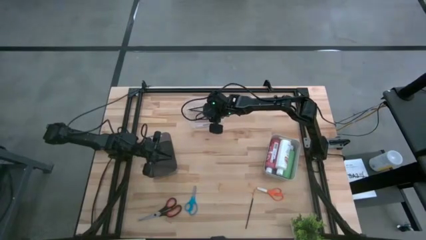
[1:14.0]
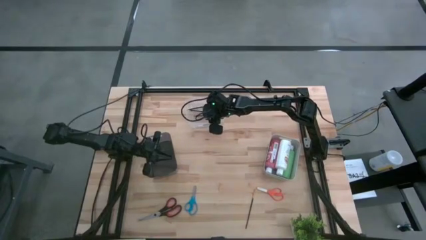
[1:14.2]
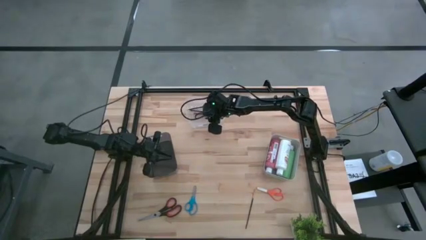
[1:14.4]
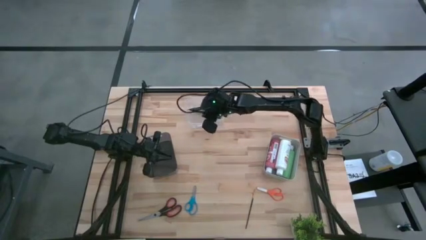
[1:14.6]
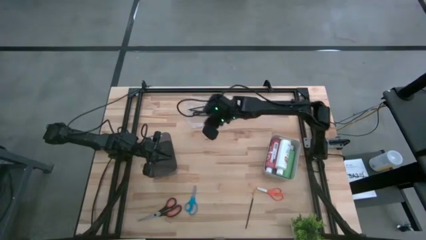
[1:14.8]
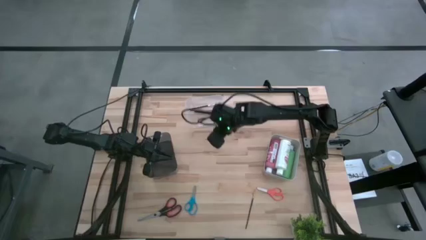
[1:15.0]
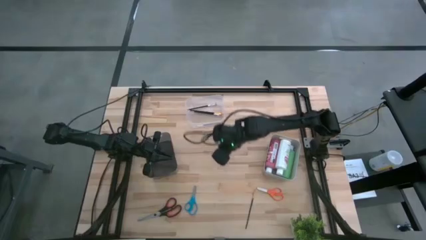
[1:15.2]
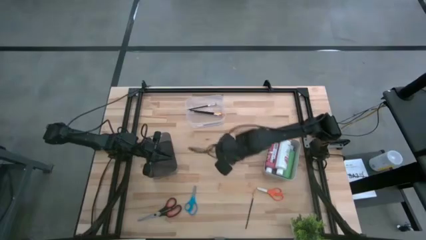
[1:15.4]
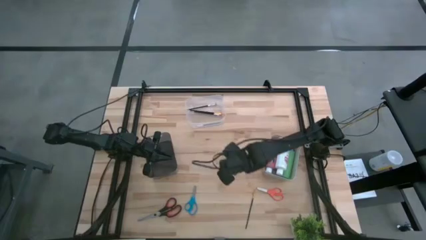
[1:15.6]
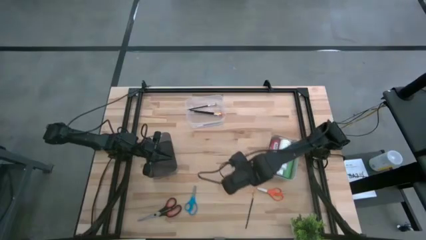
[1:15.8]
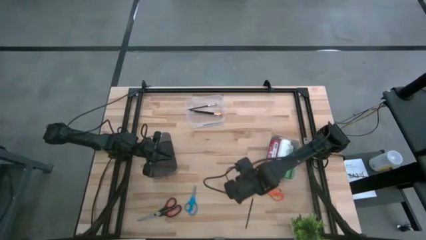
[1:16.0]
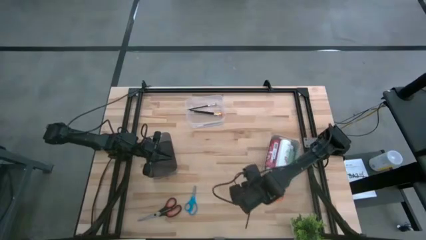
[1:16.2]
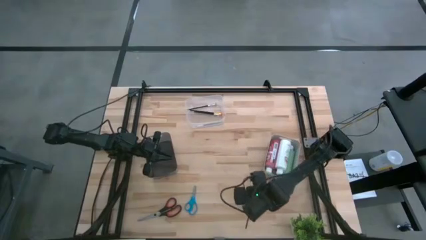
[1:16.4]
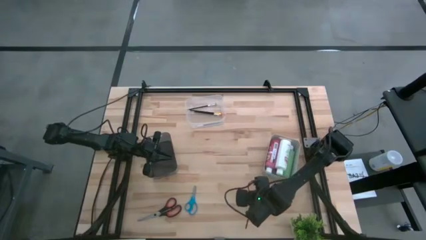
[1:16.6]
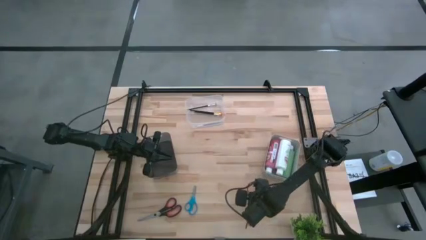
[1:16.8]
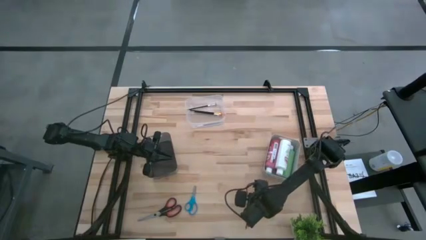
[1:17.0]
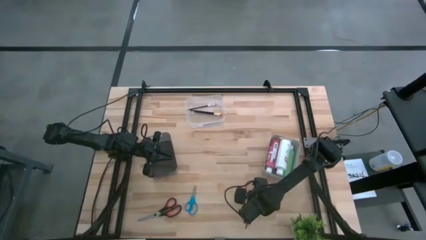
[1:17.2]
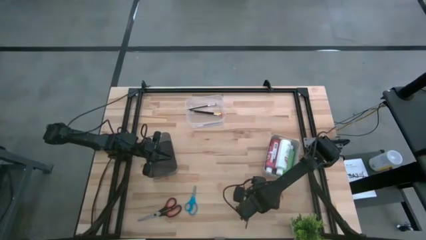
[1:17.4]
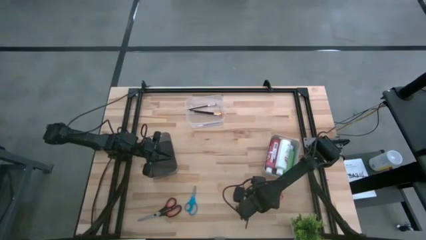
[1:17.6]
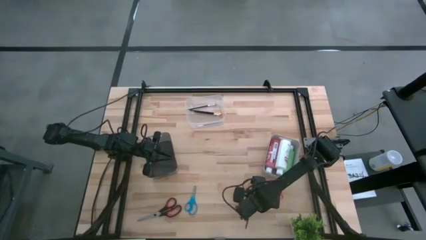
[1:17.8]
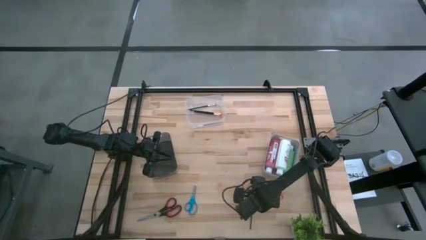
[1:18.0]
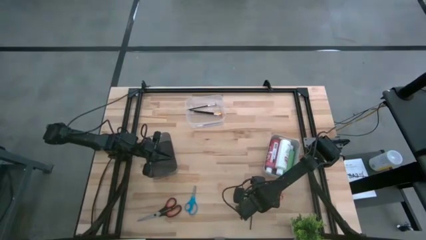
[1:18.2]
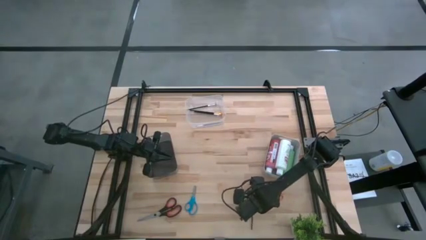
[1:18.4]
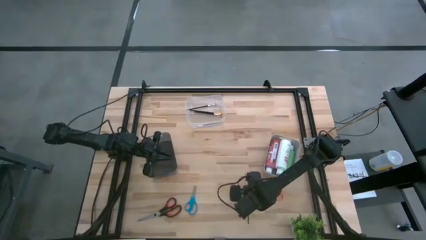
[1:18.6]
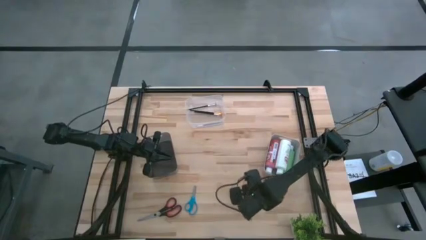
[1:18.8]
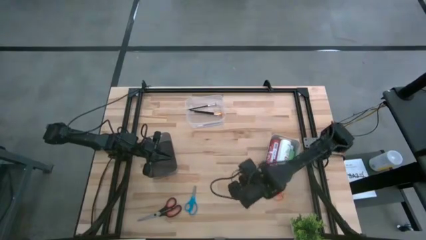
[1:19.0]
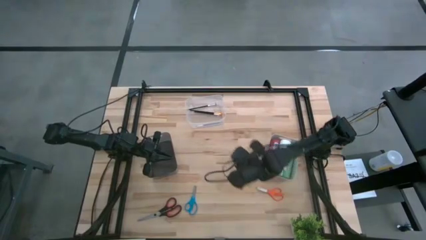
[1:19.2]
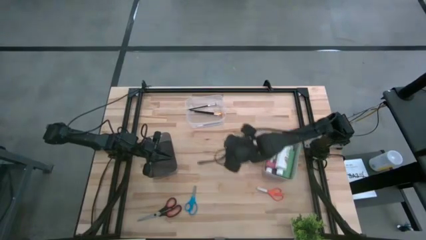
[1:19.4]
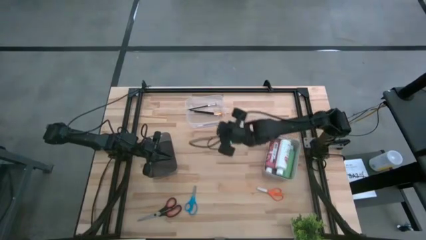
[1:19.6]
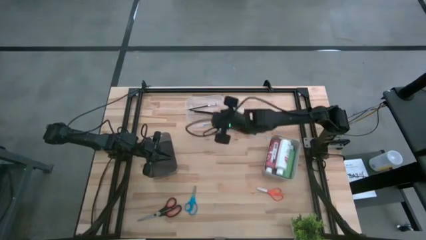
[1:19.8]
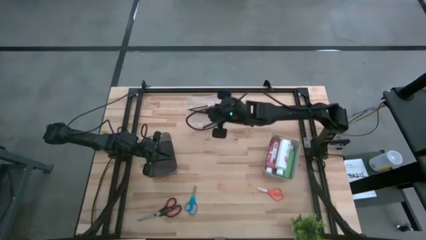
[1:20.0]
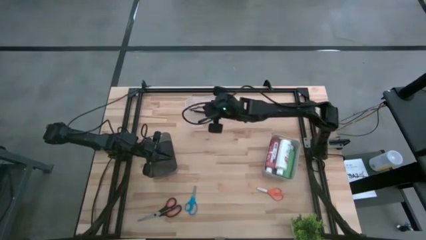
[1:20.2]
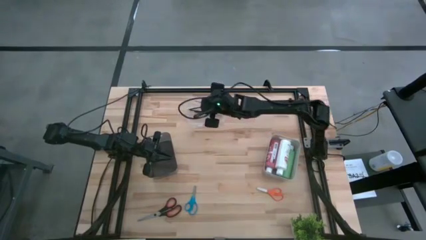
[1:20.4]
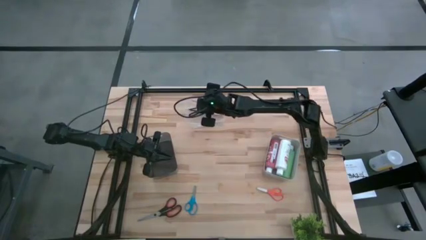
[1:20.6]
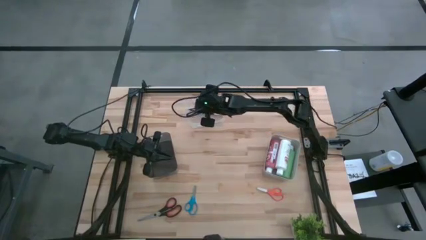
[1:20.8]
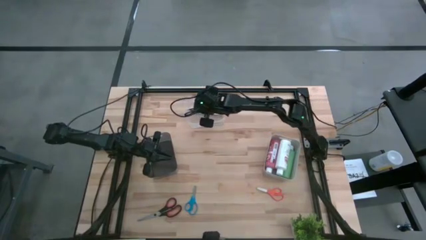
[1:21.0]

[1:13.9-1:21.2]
Task: Pick & Place Paint Supplies
Put the gold paint brush into the transparent bin

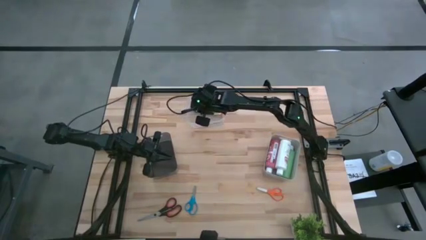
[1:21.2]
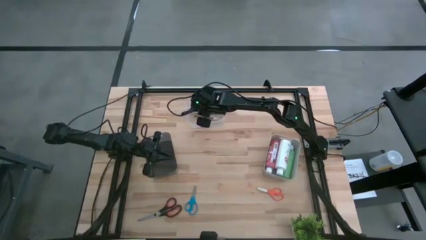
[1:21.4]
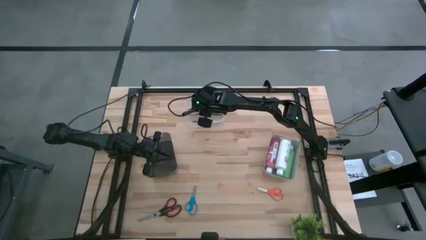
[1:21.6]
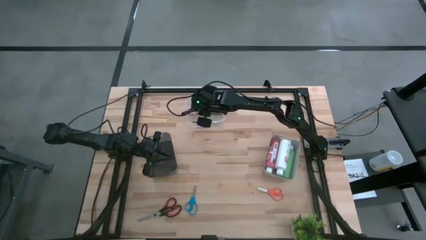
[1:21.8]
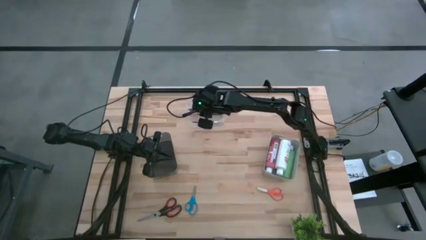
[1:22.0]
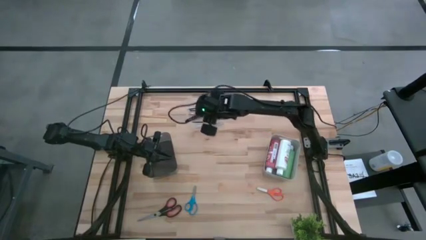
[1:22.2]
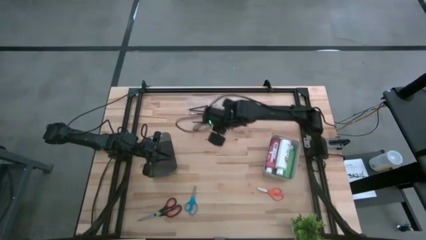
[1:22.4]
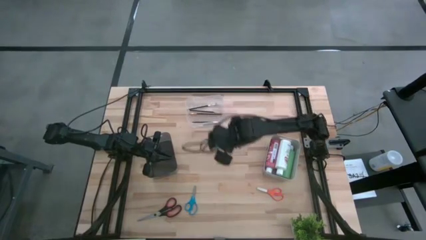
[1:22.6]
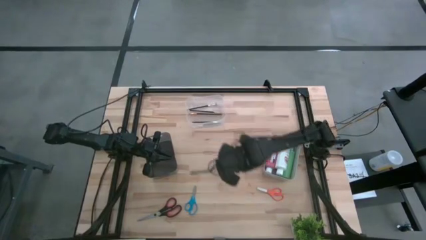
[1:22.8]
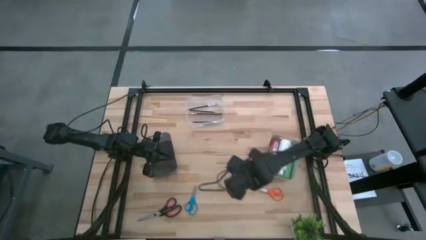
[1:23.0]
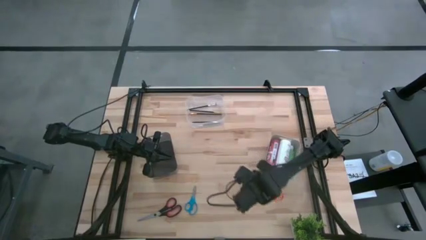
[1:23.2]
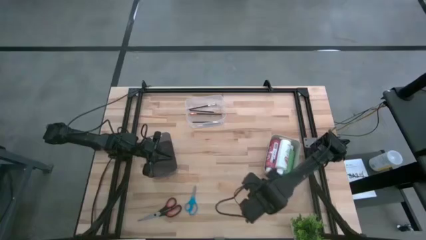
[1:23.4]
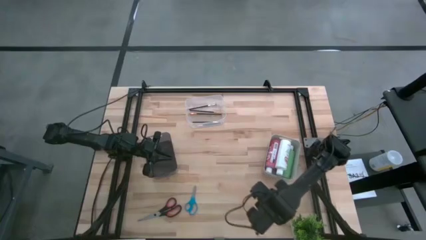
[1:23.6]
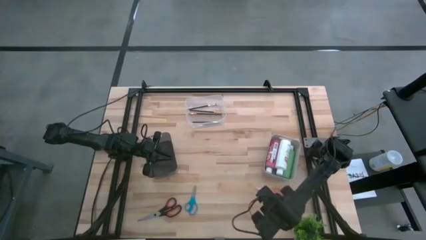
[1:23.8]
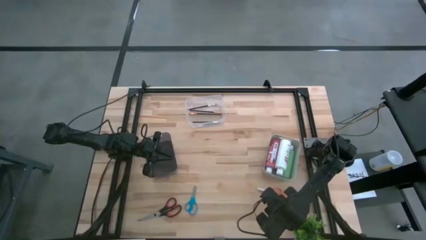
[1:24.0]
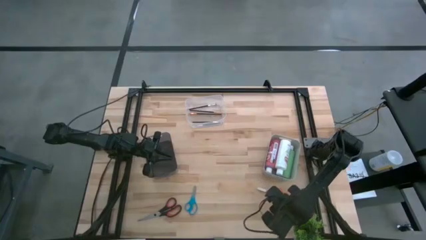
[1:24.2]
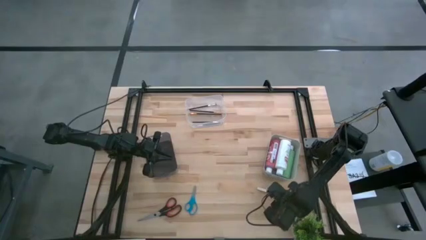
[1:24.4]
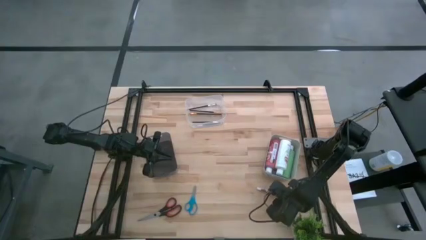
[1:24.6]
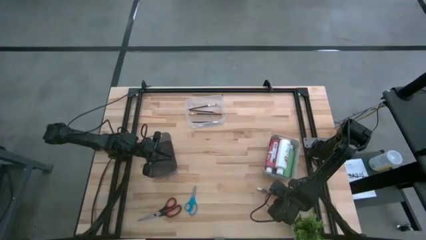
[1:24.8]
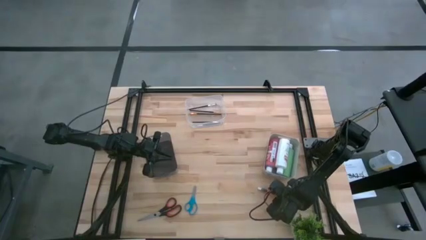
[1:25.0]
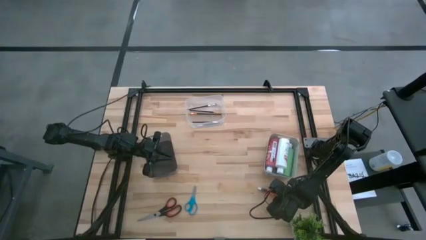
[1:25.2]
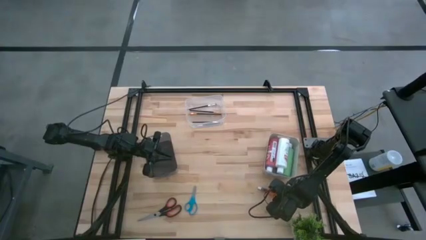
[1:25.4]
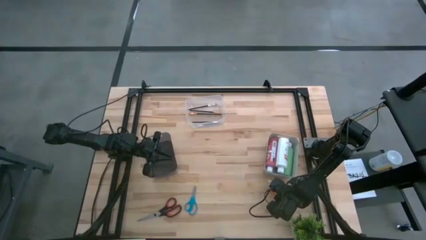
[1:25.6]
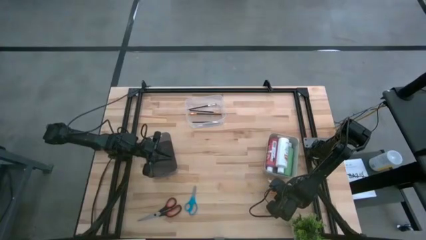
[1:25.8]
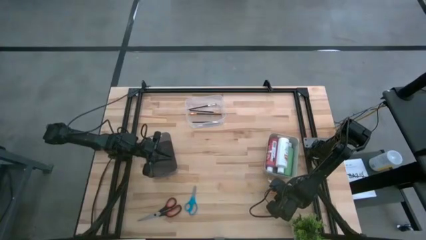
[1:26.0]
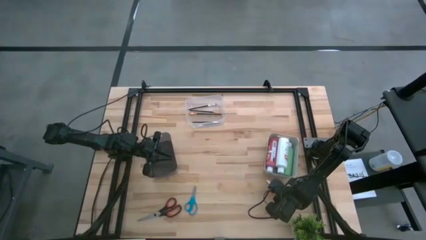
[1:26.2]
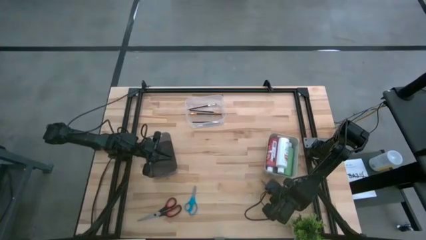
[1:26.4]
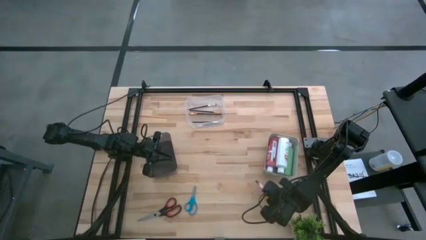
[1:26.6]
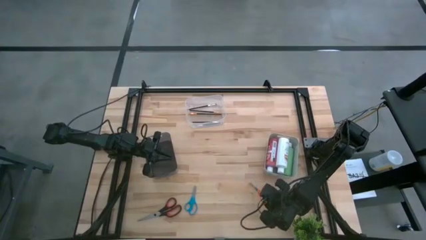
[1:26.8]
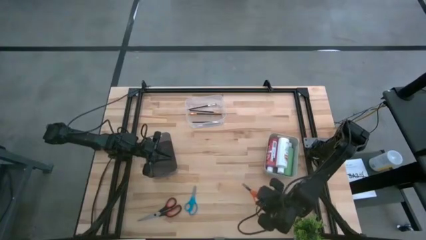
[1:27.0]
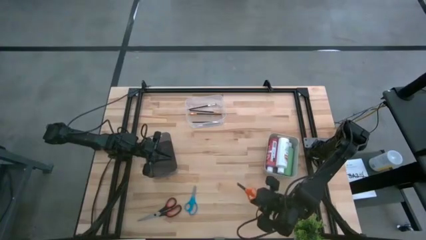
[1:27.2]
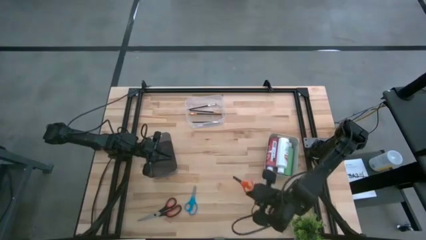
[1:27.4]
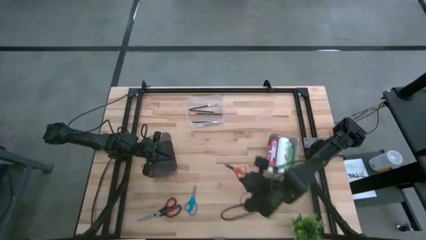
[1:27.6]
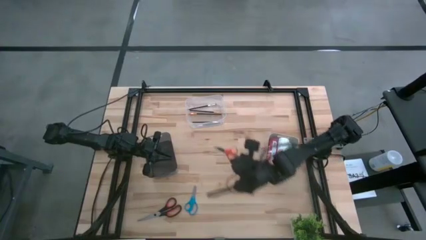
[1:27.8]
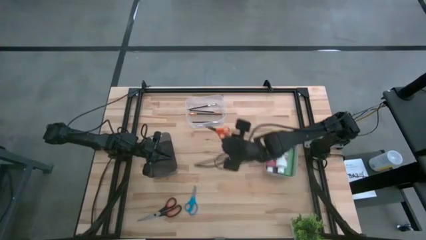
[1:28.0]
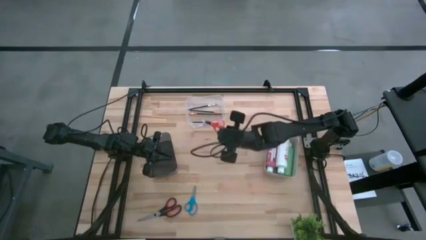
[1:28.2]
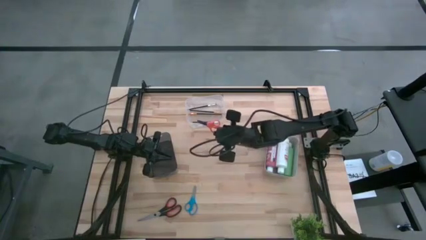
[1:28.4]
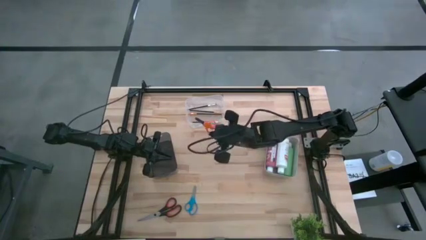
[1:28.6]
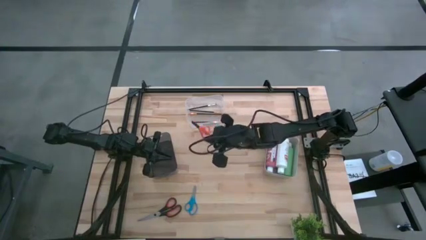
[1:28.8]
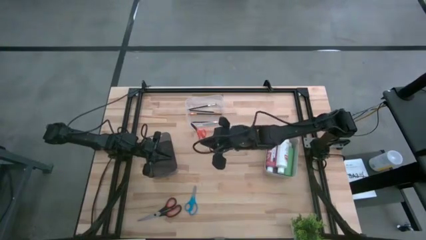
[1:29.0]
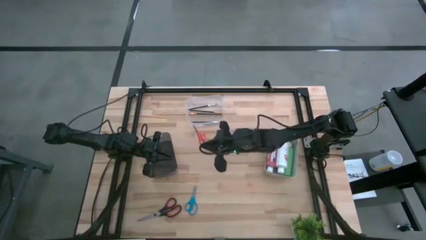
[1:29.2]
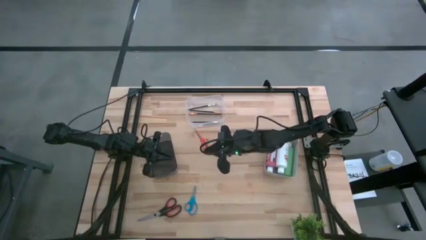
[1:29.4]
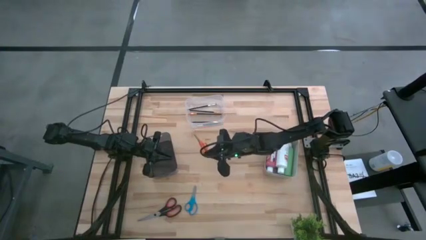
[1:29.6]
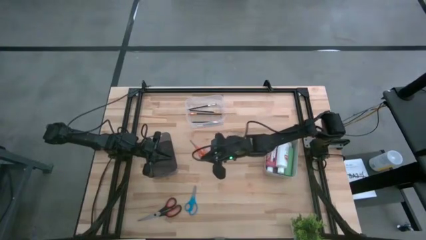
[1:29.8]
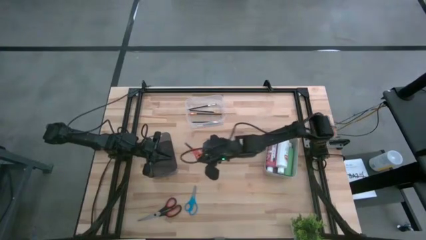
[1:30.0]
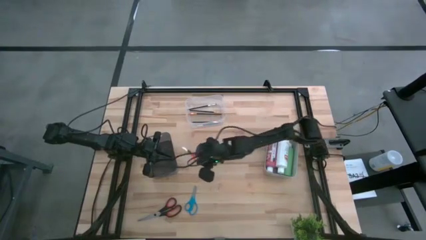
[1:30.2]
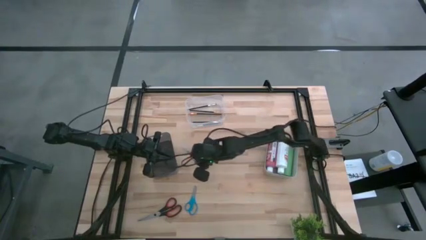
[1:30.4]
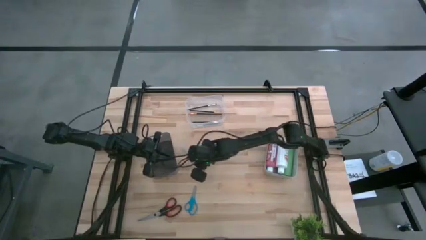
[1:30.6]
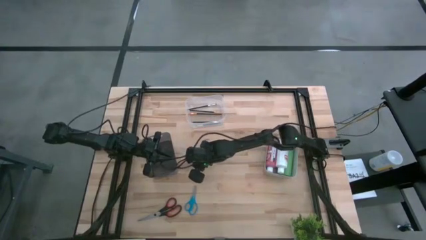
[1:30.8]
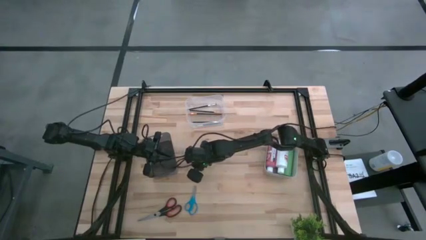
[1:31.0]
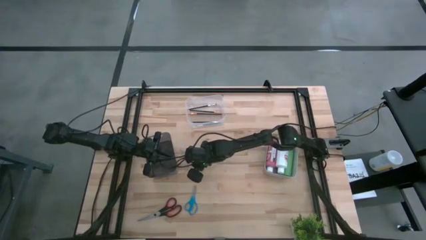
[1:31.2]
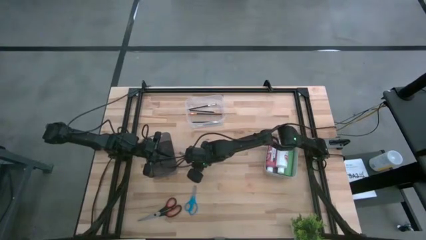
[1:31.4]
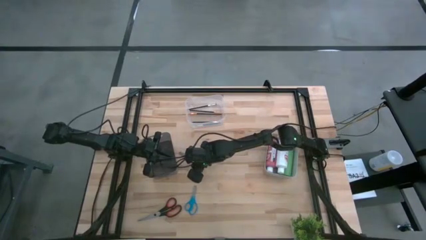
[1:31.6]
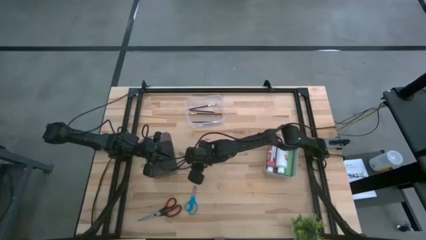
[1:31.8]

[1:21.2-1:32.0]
Put the orange scissors into the black bin

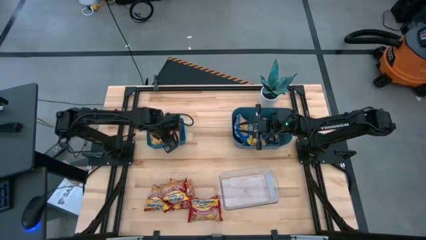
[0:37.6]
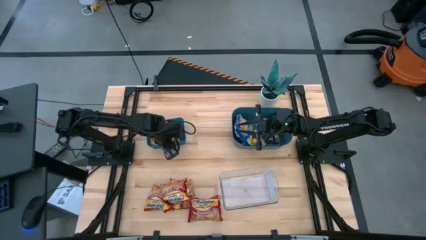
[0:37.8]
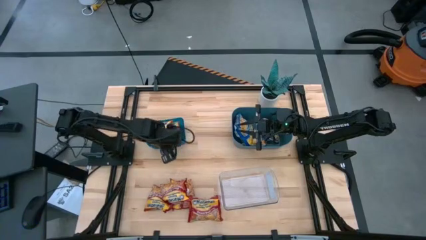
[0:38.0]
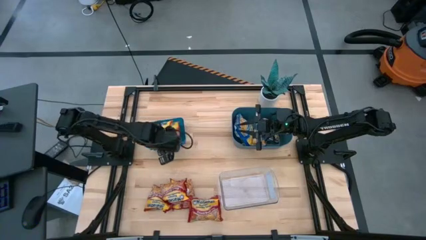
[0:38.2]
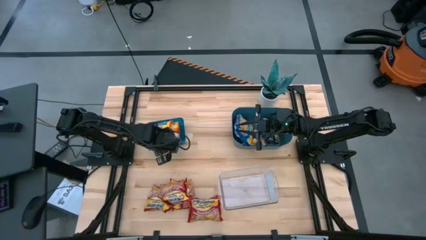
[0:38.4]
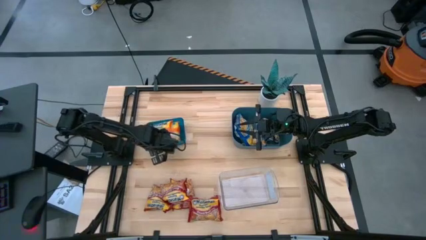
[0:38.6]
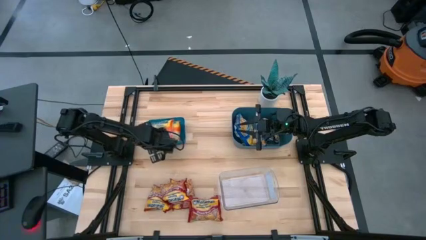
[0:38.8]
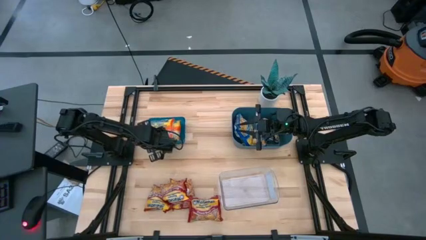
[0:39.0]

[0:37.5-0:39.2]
Task: Sort Maruchan noodles
Adjust the blue bin on the table
